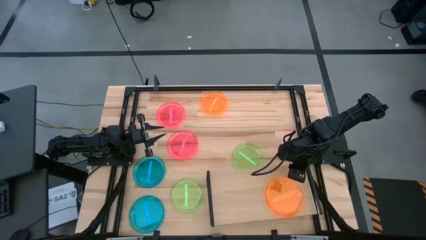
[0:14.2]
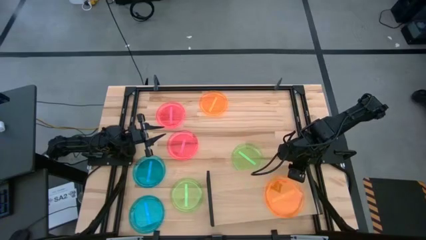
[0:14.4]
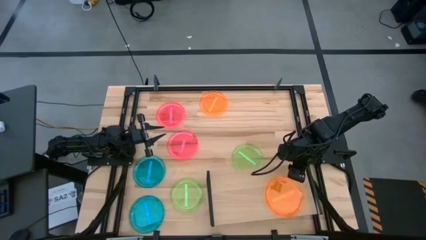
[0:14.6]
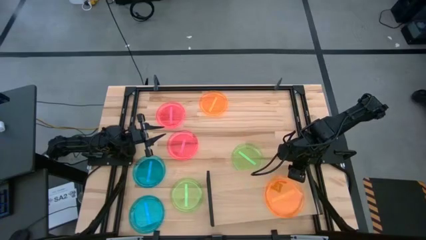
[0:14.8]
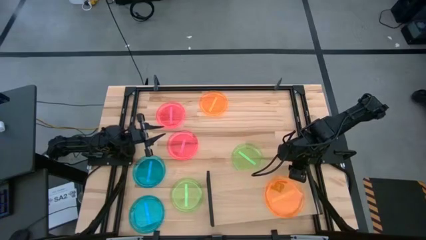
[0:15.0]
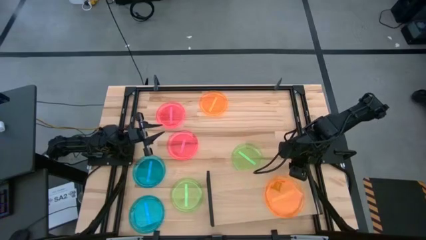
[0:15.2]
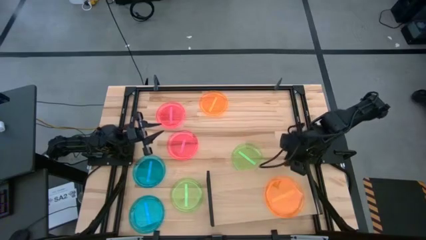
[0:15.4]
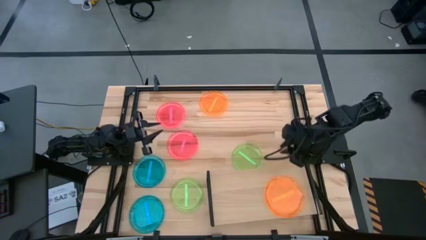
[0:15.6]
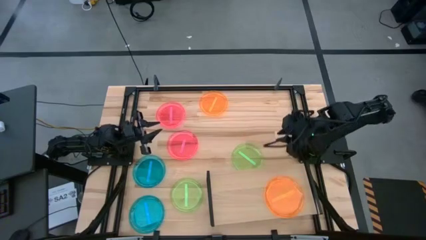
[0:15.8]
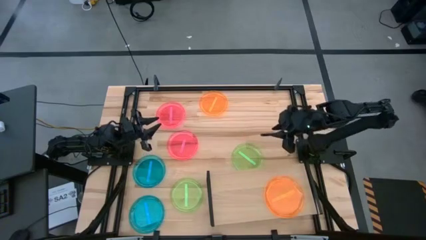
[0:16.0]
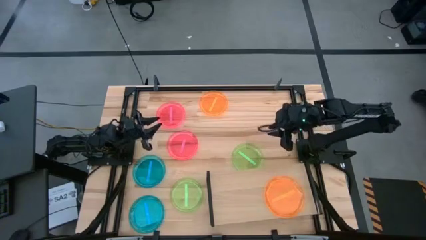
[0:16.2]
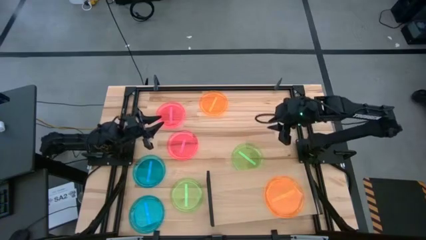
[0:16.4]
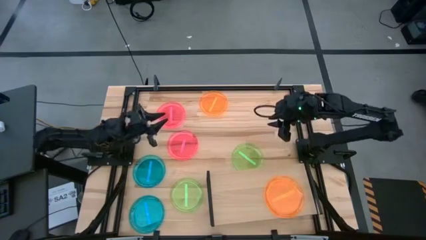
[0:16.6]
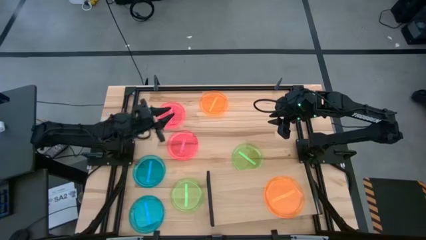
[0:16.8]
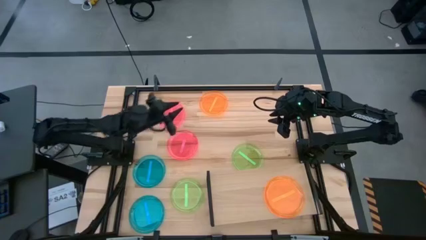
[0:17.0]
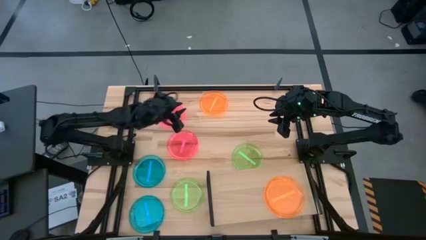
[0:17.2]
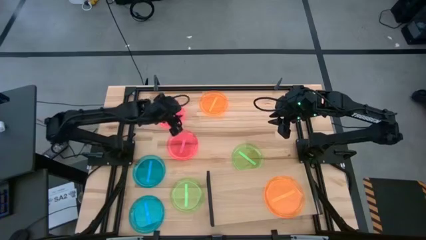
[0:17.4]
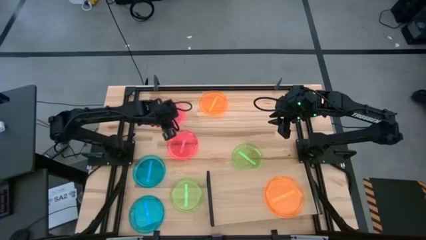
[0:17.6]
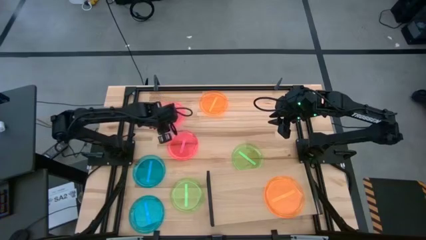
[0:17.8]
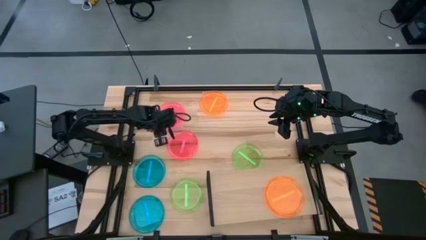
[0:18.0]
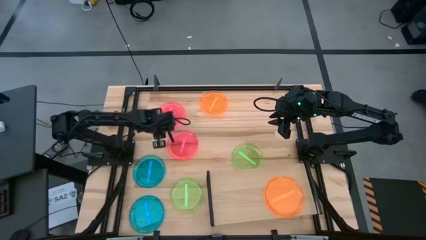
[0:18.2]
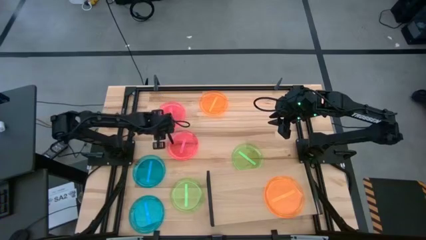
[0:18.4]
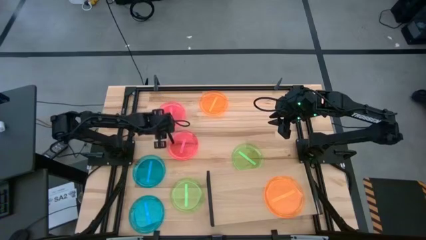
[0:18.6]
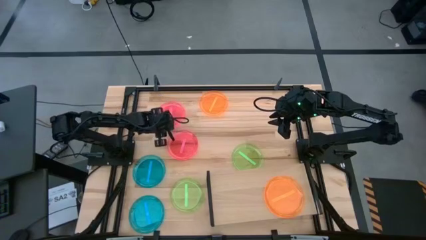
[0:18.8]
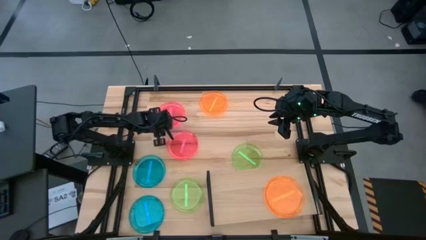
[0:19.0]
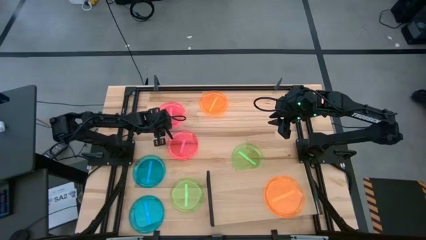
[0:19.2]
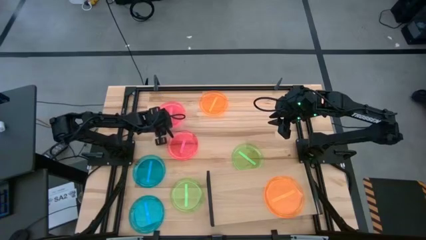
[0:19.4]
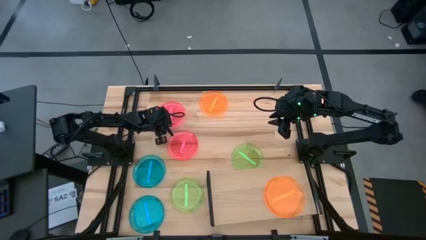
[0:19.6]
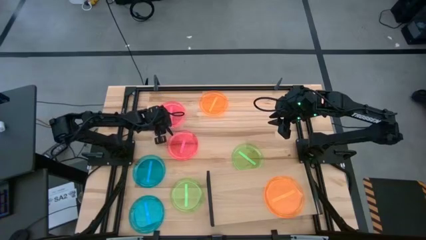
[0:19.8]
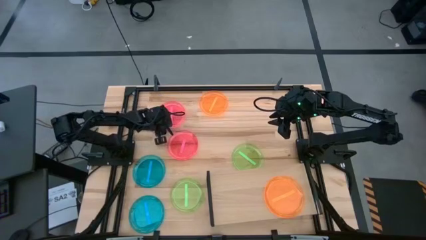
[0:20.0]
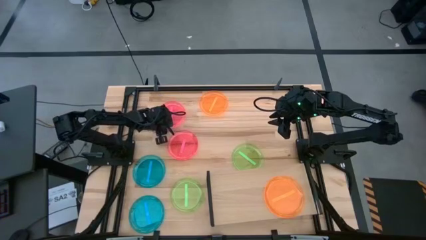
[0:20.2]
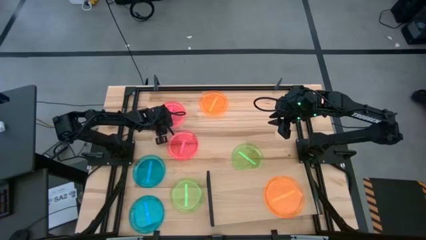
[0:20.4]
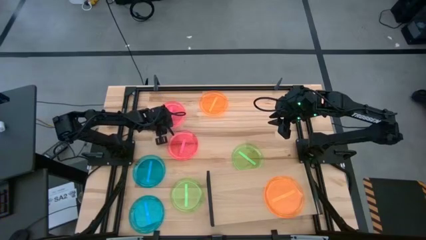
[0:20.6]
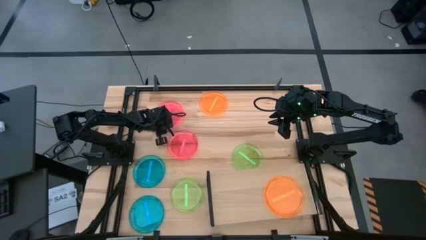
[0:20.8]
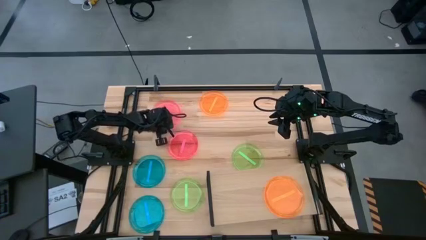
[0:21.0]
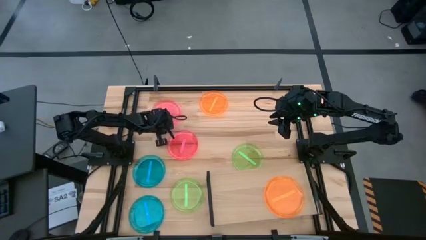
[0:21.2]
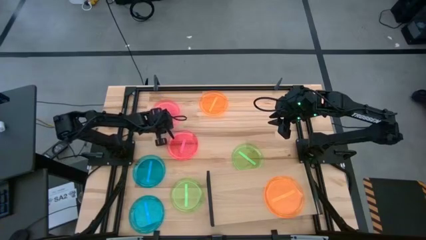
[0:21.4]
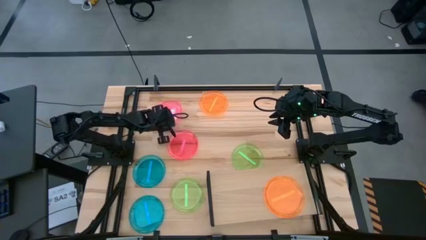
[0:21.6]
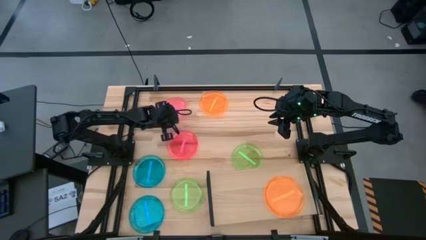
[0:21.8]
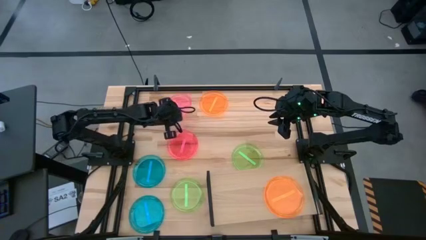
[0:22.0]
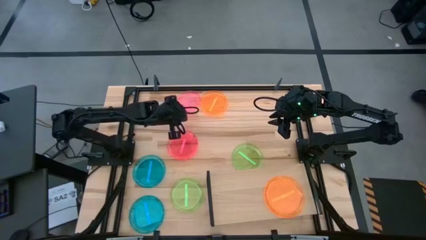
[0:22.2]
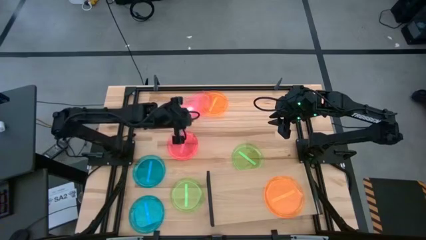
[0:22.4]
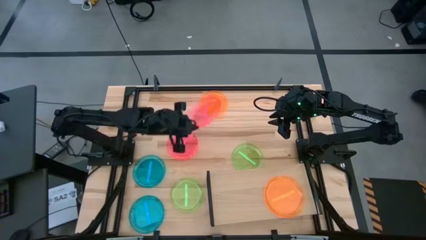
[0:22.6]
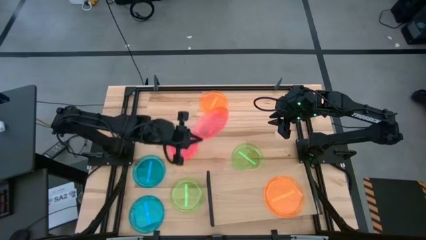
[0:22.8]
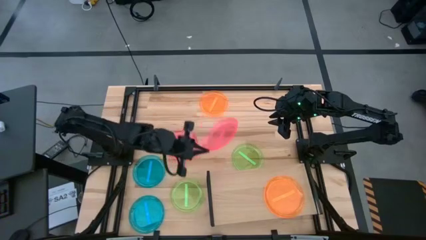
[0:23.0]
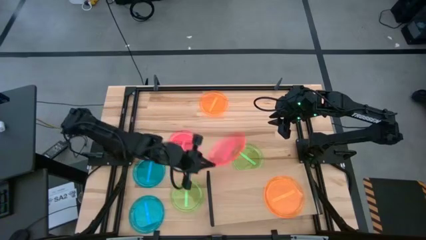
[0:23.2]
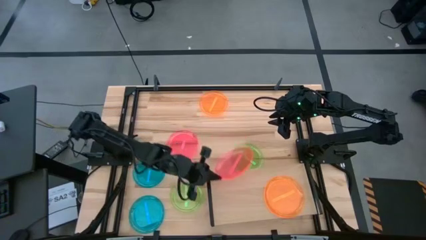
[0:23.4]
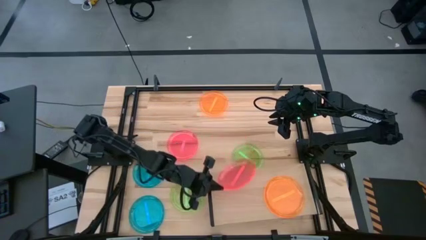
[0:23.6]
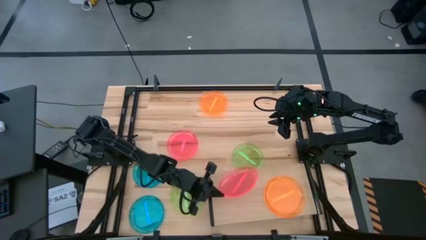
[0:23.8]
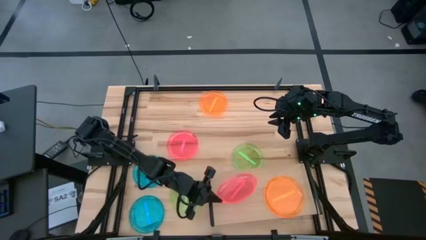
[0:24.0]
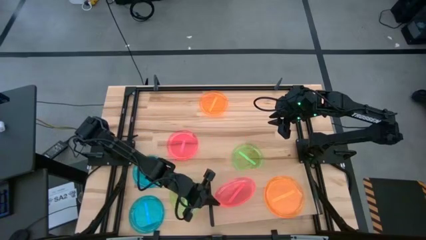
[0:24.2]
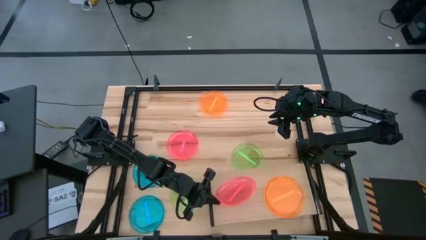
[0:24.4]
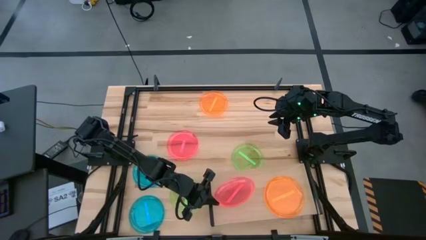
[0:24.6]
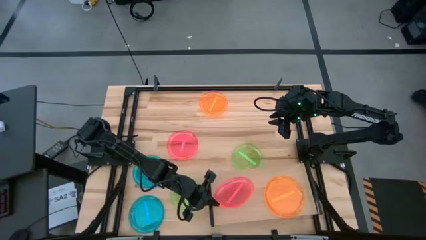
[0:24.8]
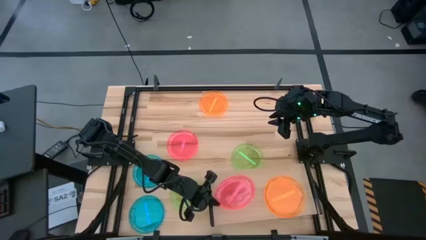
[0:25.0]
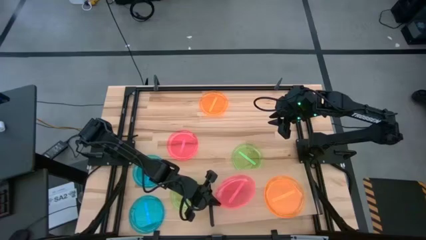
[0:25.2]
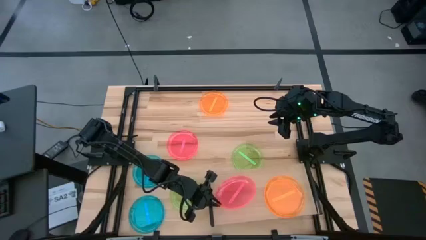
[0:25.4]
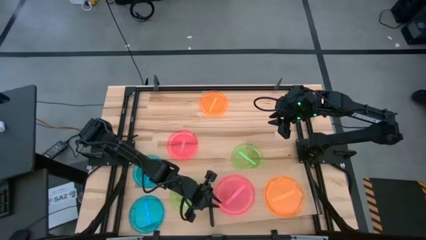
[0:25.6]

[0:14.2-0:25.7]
Task: Place and stack plates onto a shelf
Put the top pink plate on the shelf
